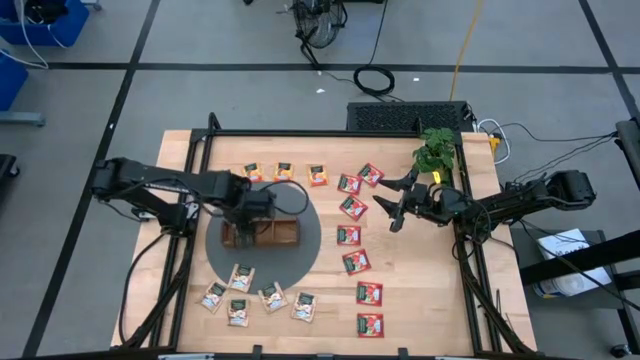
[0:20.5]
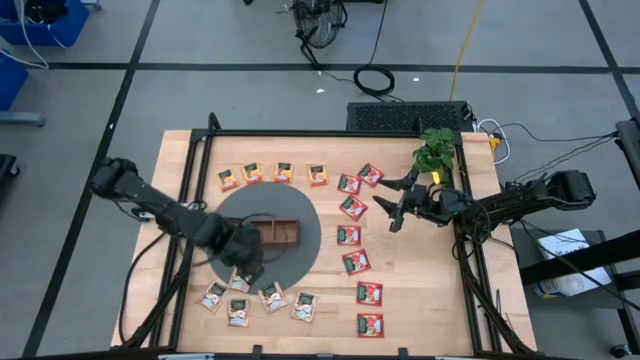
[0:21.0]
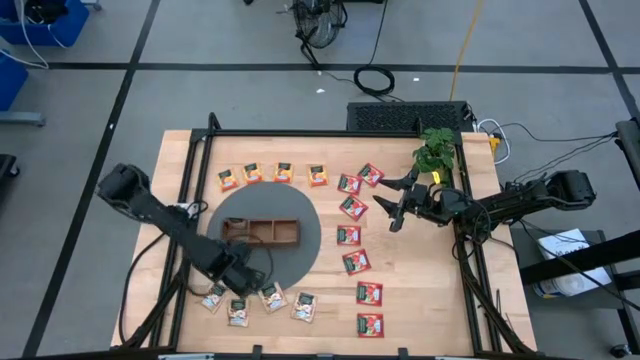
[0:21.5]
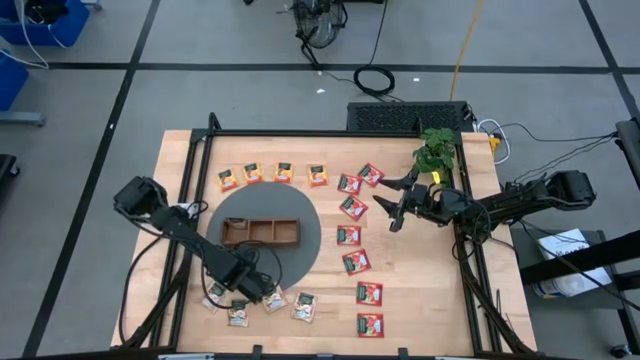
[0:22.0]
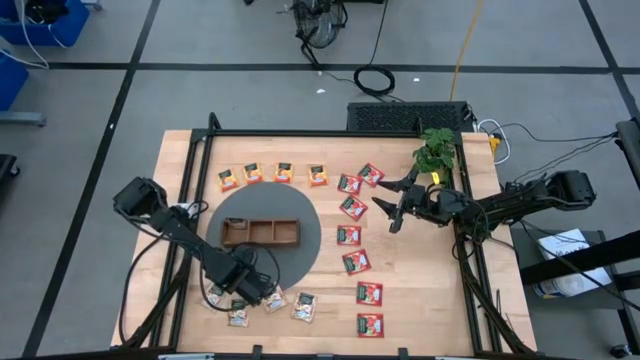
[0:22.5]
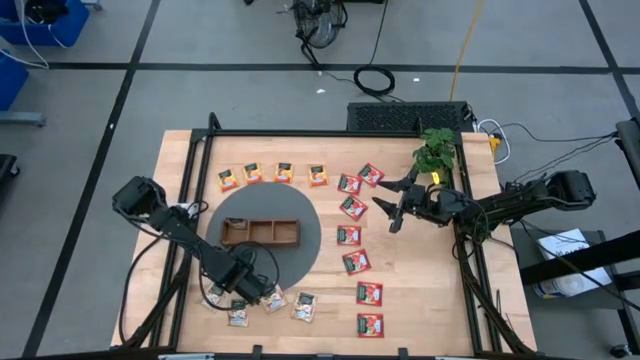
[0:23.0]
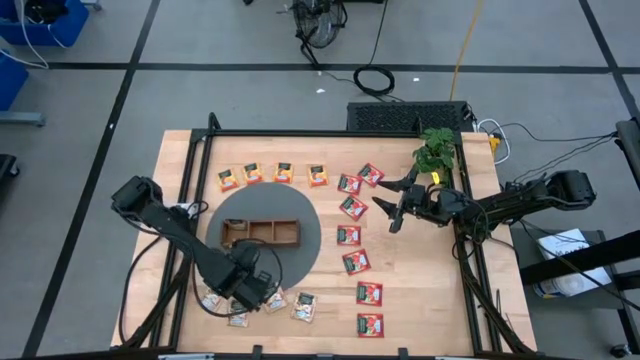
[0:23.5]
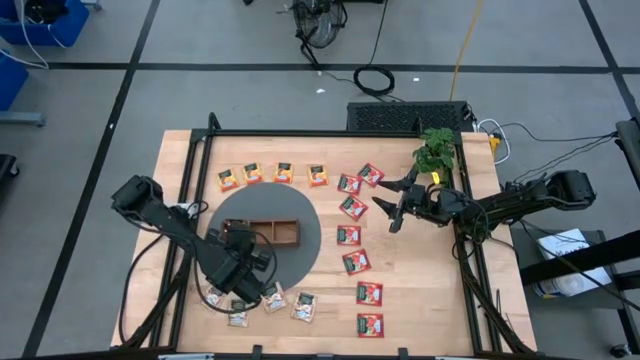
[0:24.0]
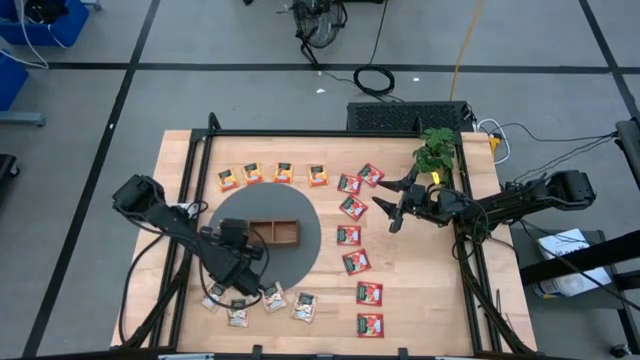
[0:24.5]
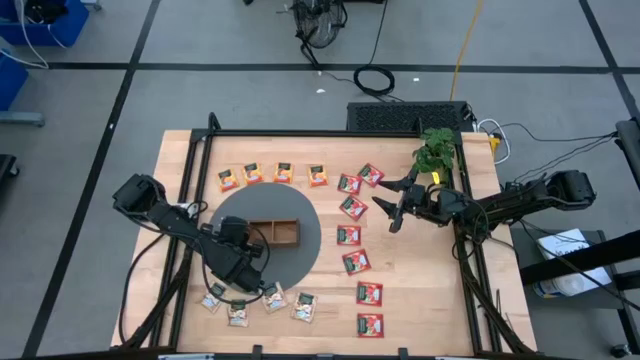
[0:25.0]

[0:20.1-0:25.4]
Task: Pick & Place Tea
Put the brown tea bag into the left section of the wooden organizer

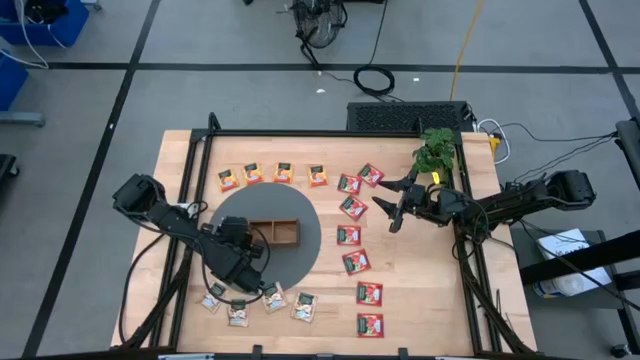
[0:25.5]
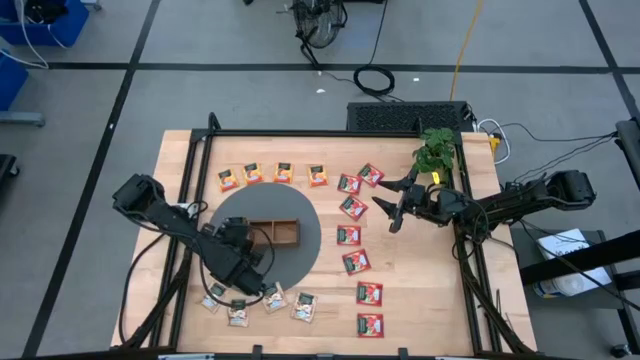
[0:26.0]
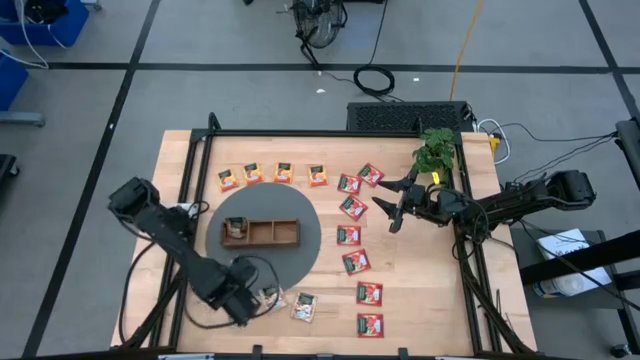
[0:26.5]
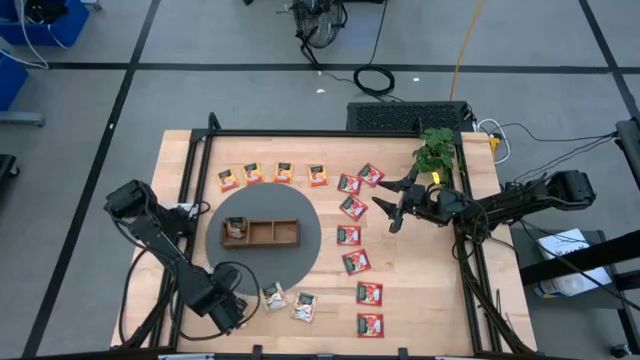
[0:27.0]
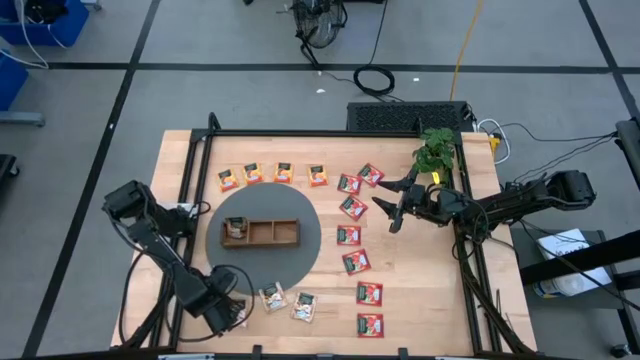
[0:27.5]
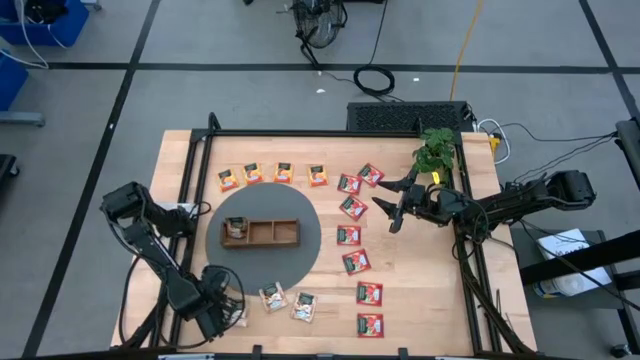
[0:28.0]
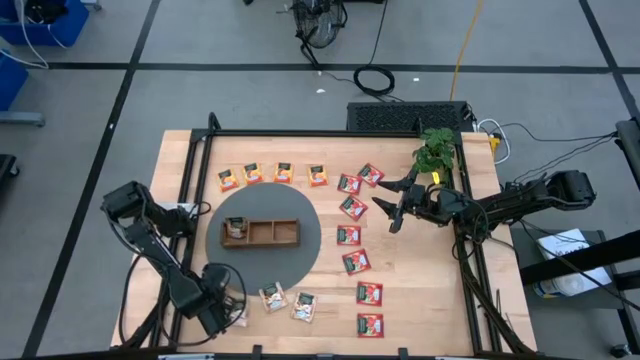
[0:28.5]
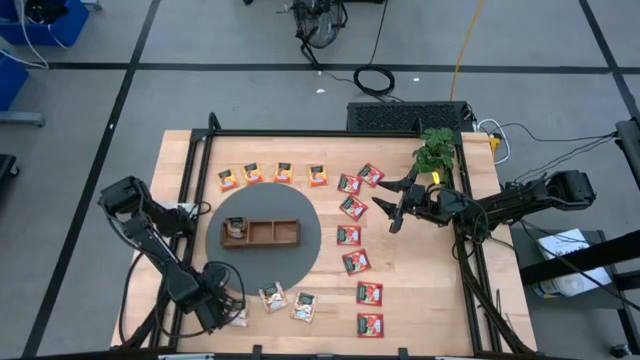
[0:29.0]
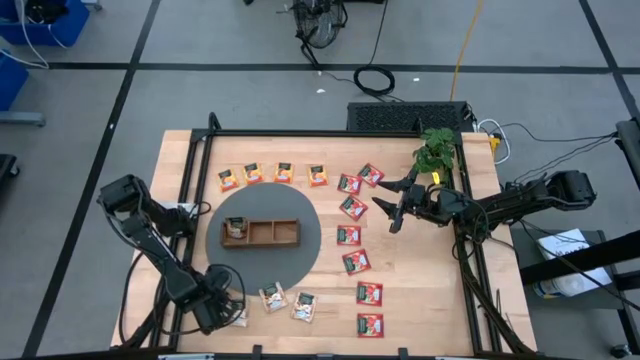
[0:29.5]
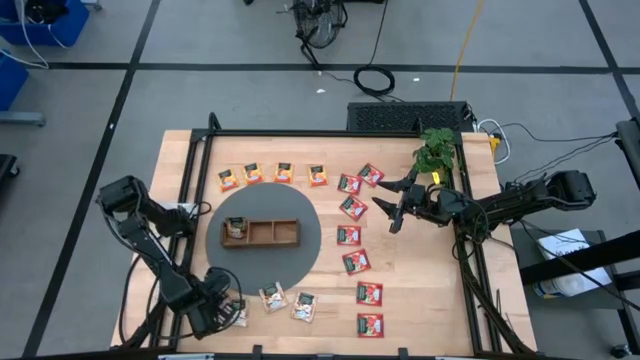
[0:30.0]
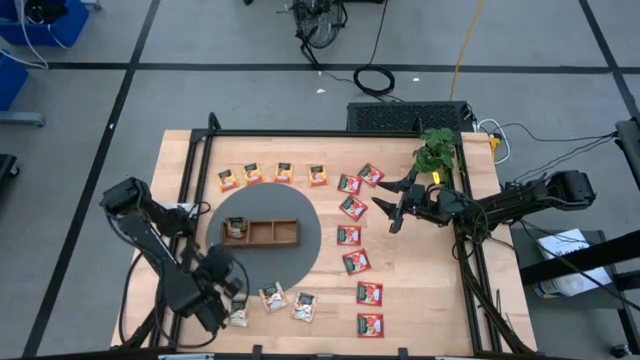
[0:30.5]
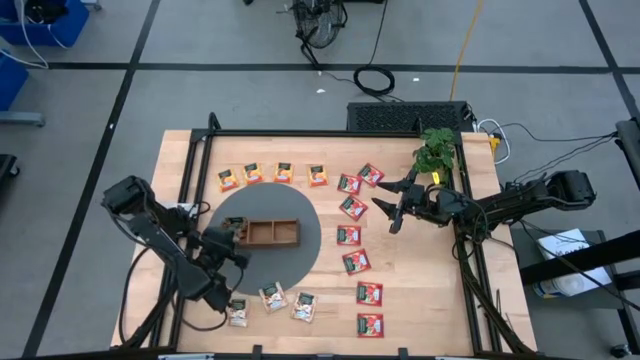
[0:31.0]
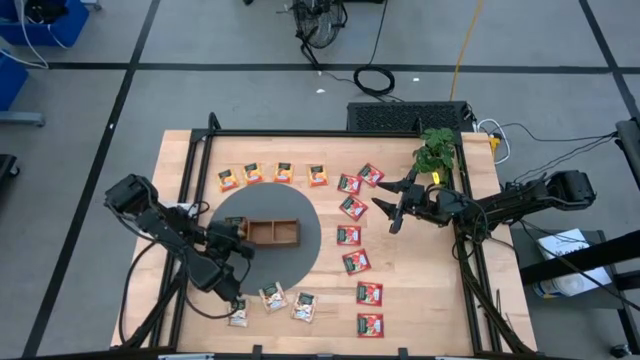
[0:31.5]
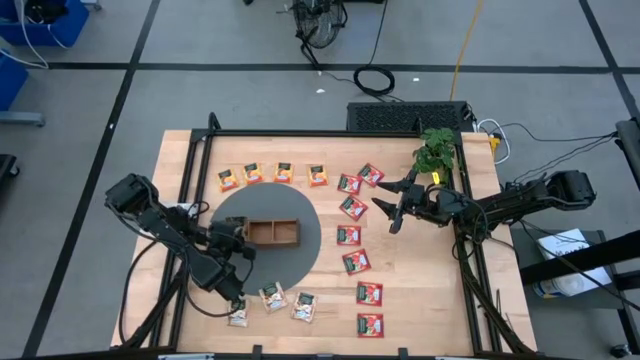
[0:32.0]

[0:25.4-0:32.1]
Put the brown tea bag into the left section of the wooden organizer

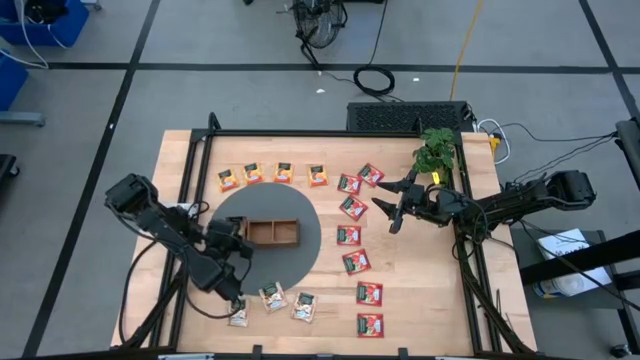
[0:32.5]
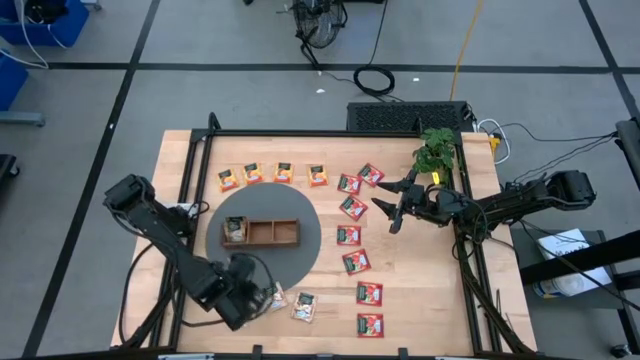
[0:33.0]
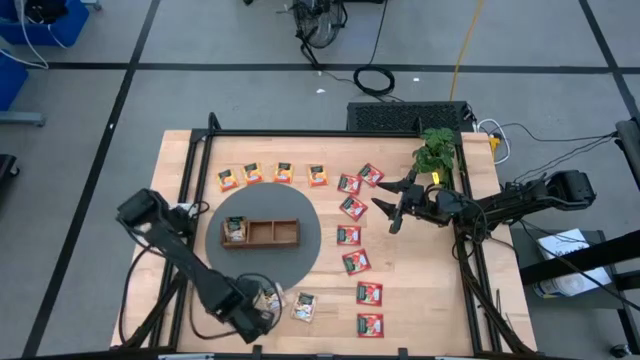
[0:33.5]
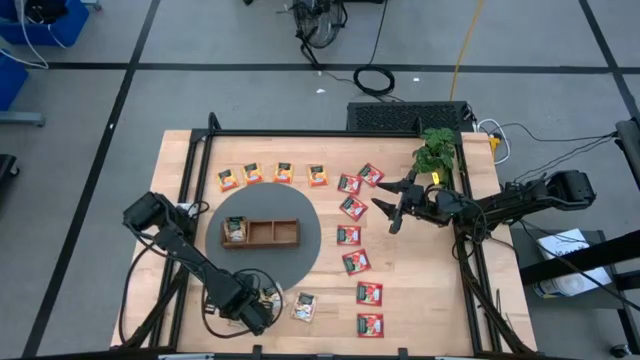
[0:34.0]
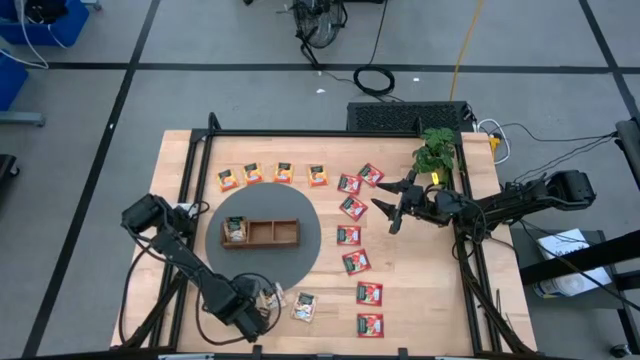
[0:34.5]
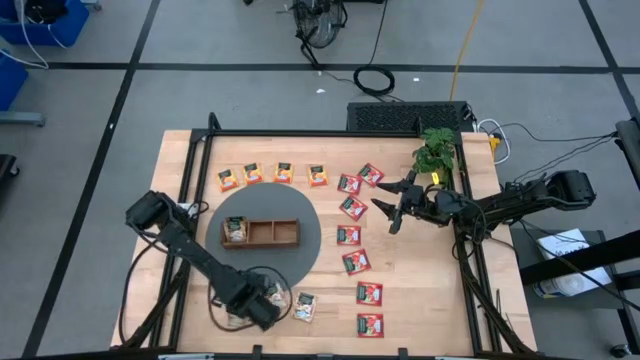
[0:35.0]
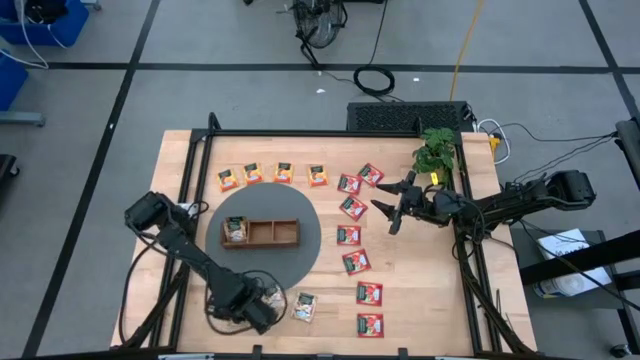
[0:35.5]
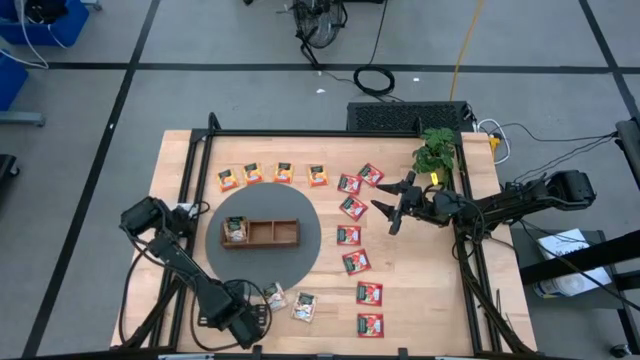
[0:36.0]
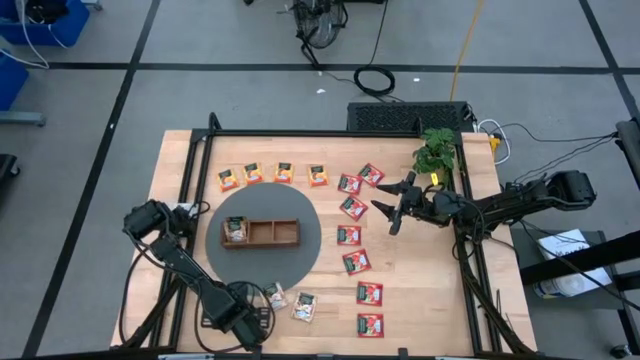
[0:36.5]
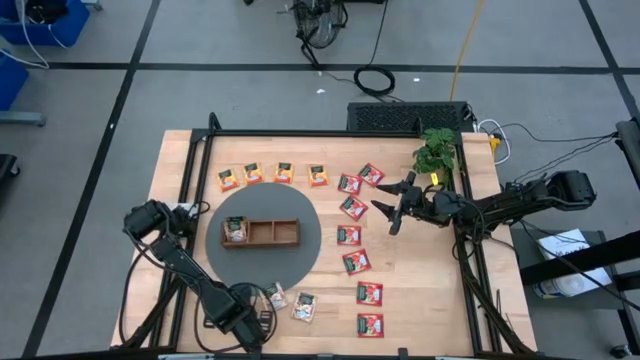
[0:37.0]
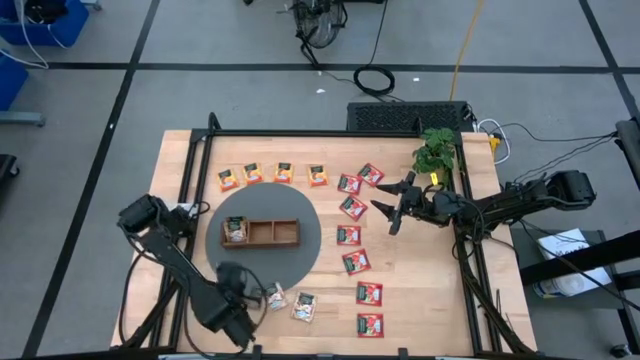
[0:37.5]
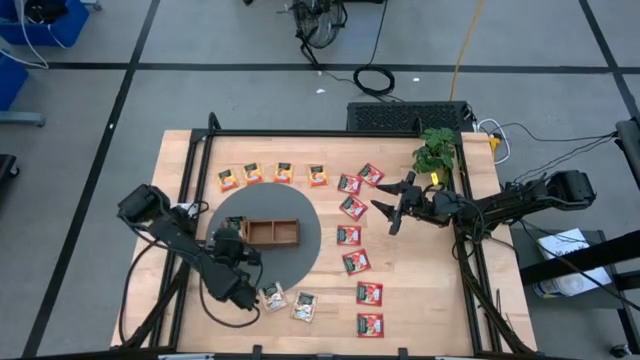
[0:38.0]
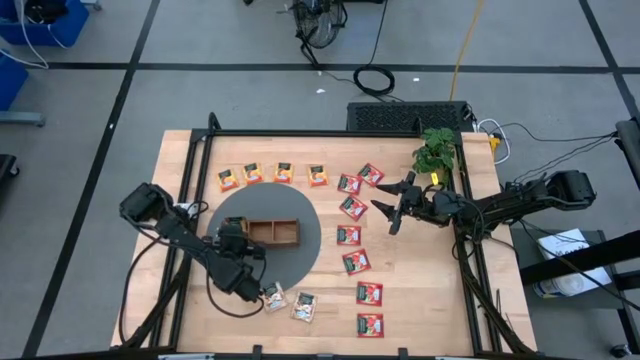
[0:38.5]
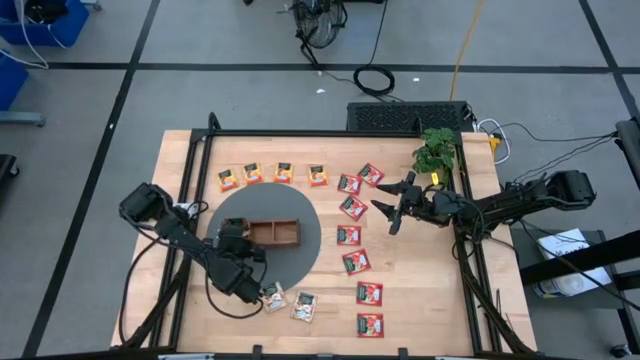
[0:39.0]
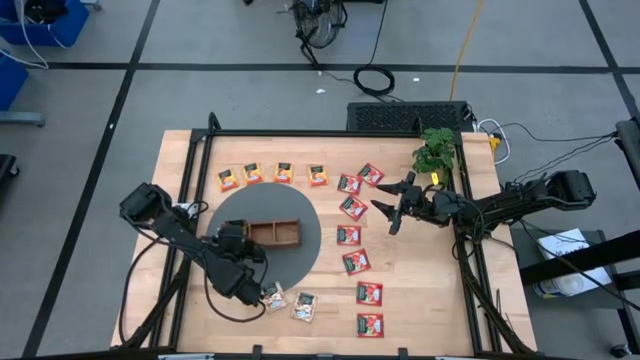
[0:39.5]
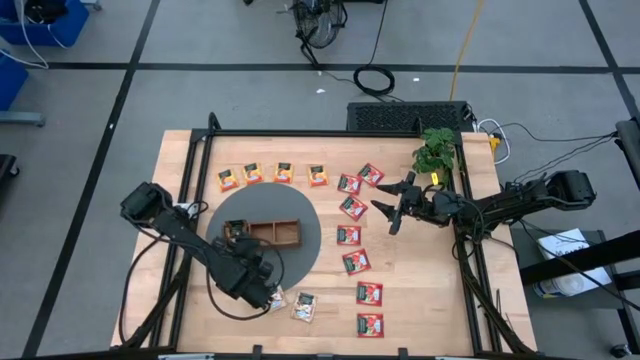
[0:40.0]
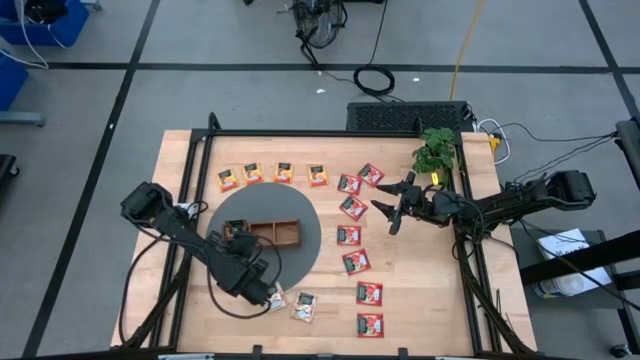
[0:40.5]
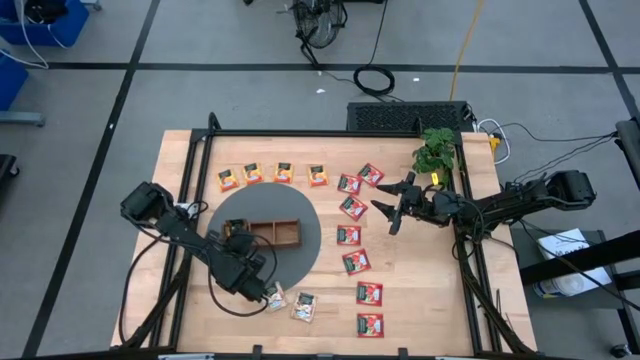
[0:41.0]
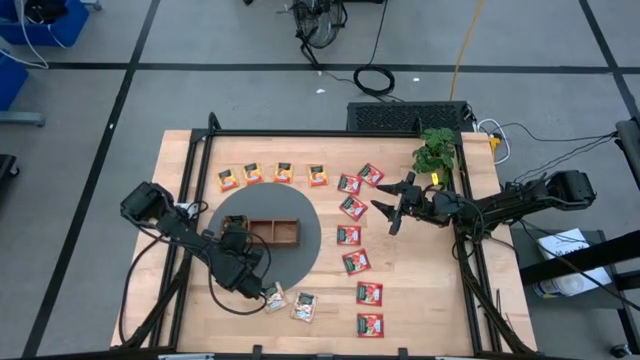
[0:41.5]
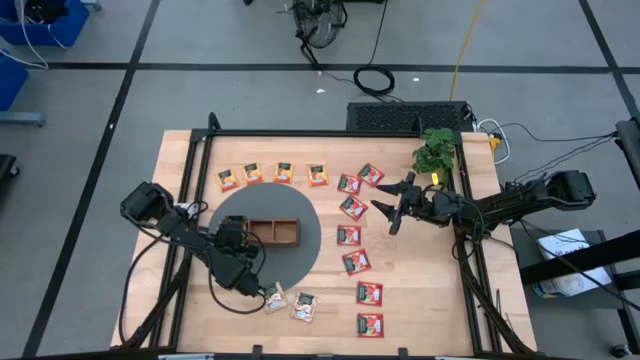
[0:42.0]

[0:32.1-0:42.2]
Put the brown tea bag into the left section of the wooden organizer
